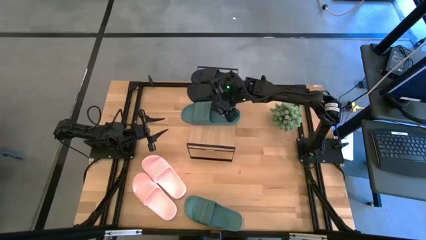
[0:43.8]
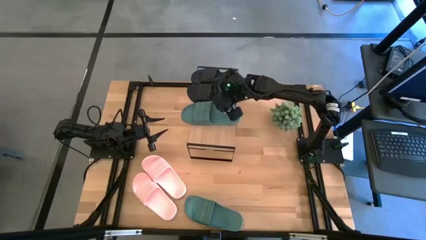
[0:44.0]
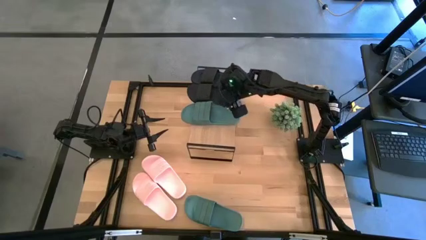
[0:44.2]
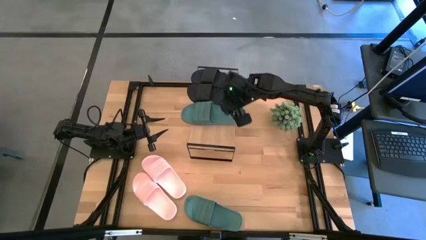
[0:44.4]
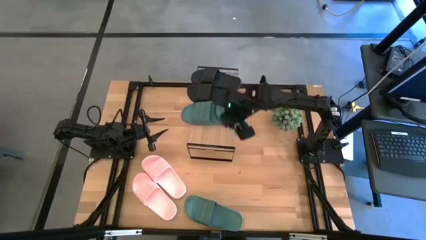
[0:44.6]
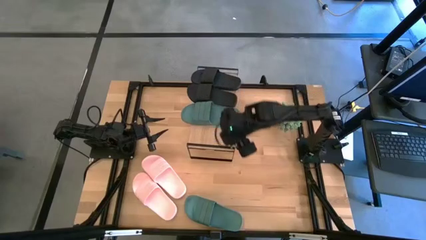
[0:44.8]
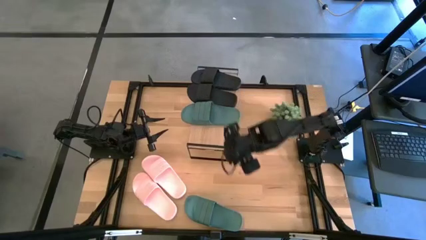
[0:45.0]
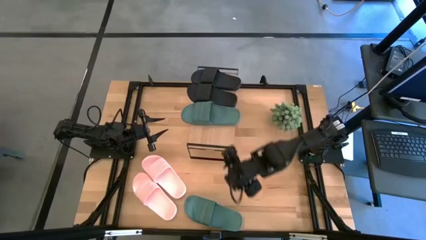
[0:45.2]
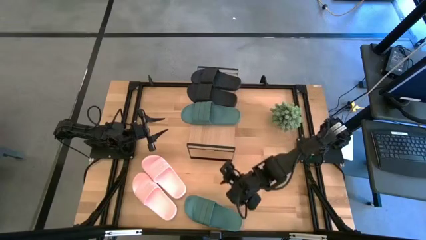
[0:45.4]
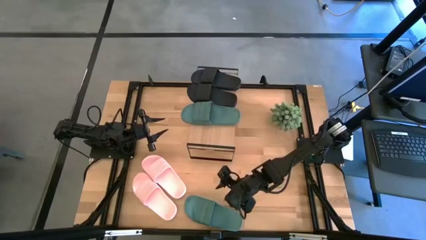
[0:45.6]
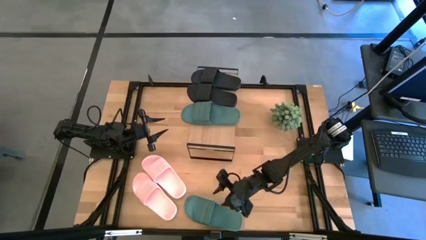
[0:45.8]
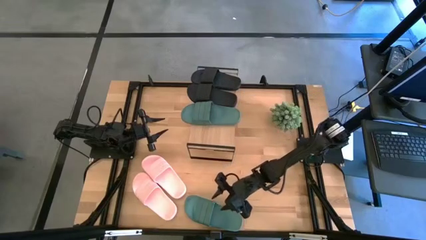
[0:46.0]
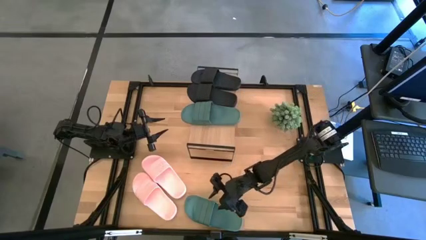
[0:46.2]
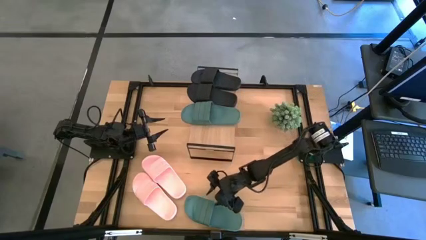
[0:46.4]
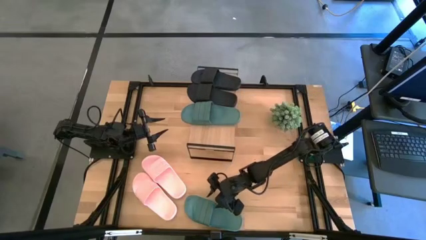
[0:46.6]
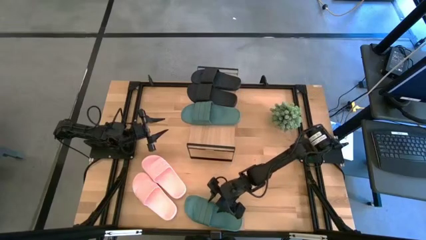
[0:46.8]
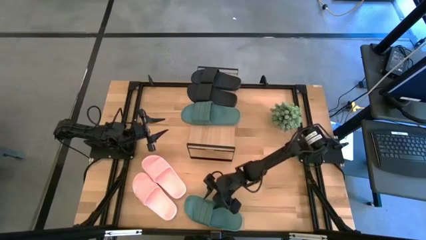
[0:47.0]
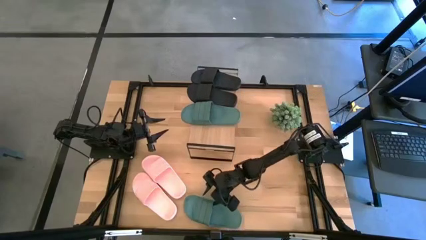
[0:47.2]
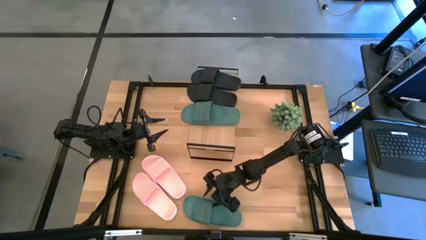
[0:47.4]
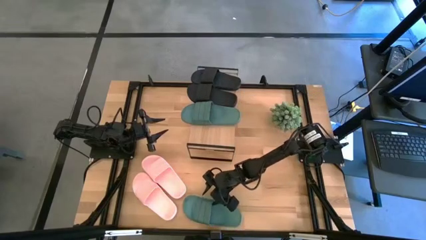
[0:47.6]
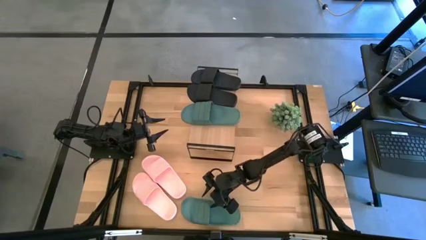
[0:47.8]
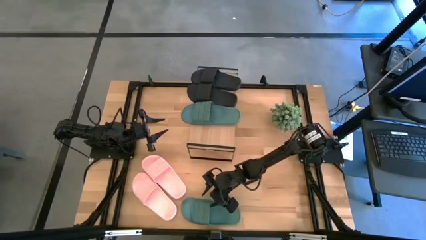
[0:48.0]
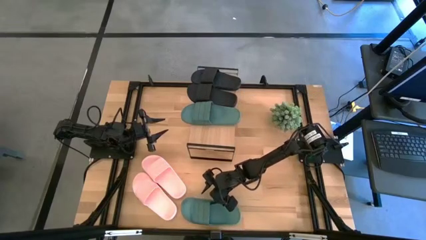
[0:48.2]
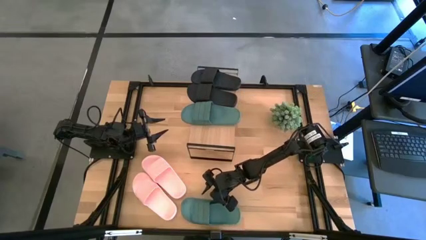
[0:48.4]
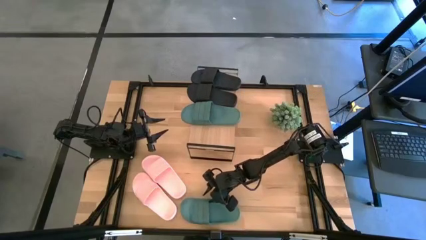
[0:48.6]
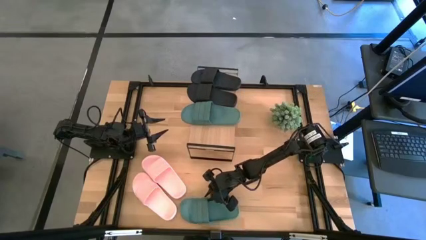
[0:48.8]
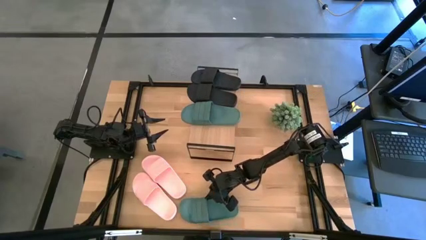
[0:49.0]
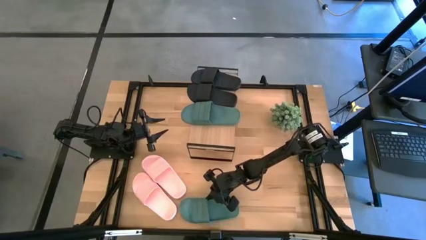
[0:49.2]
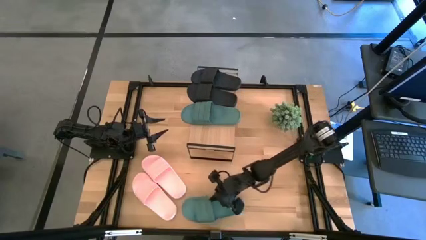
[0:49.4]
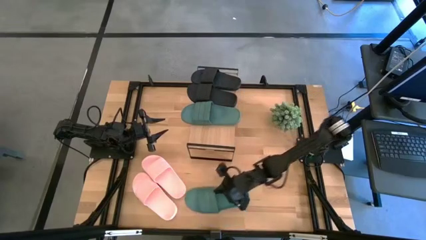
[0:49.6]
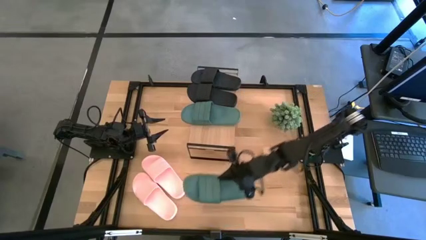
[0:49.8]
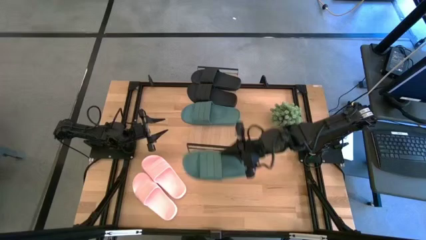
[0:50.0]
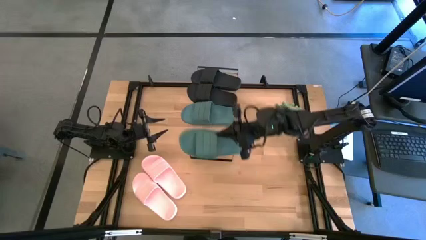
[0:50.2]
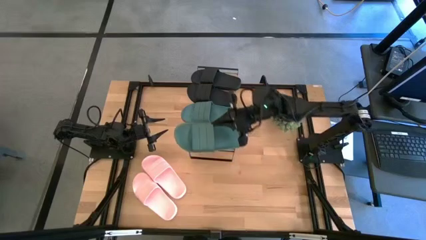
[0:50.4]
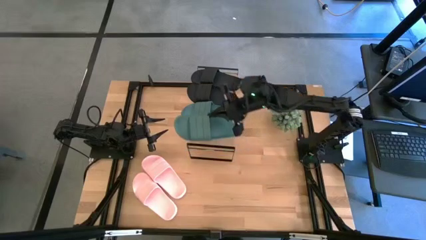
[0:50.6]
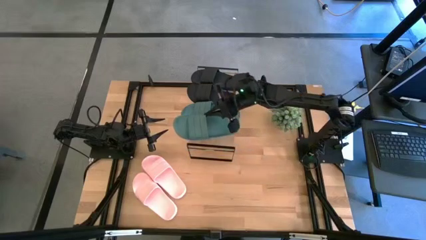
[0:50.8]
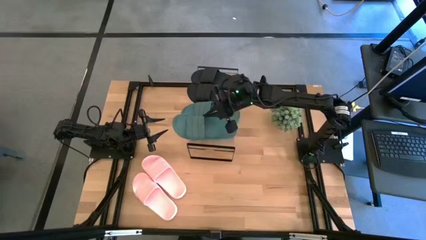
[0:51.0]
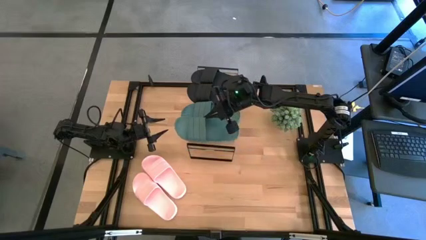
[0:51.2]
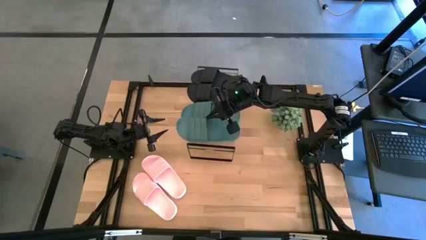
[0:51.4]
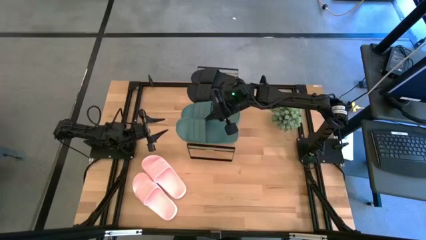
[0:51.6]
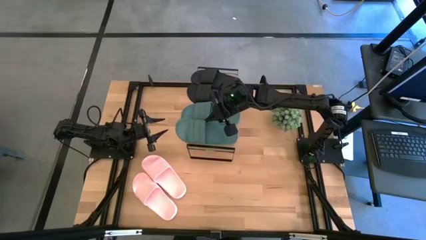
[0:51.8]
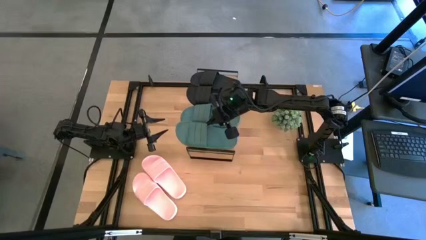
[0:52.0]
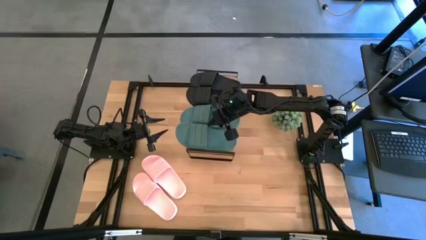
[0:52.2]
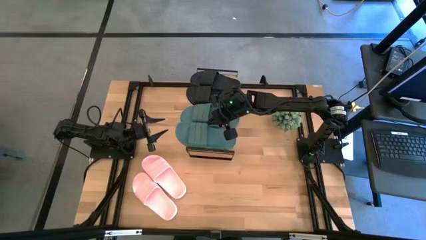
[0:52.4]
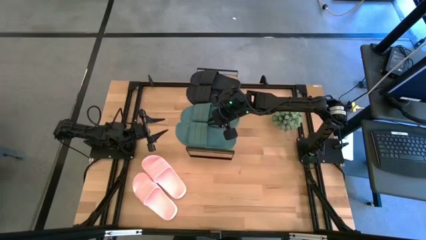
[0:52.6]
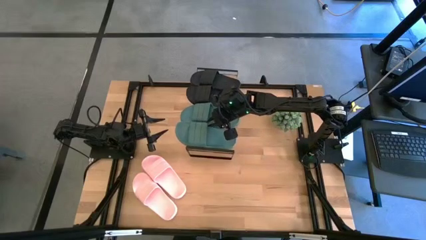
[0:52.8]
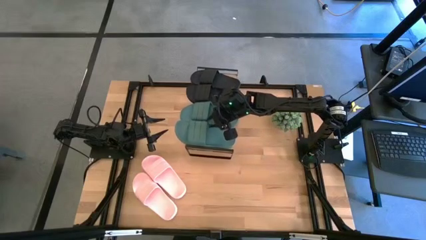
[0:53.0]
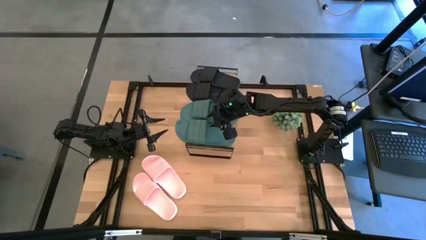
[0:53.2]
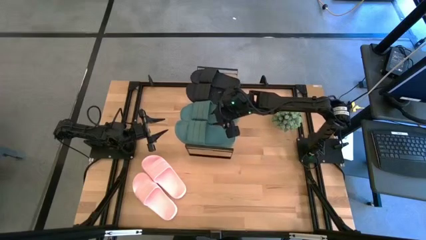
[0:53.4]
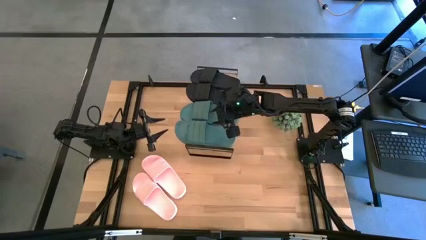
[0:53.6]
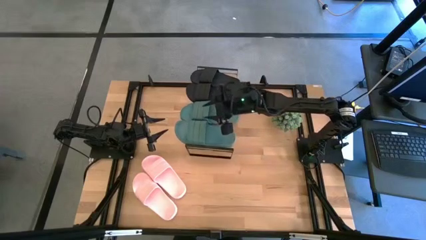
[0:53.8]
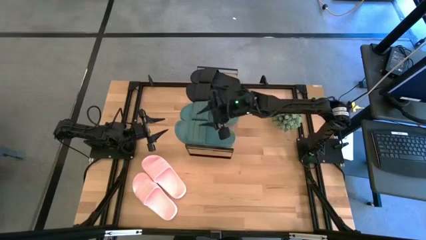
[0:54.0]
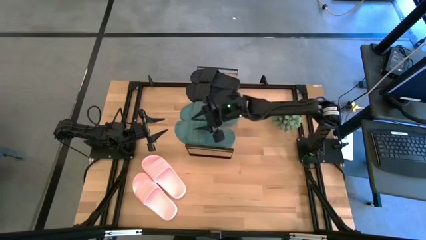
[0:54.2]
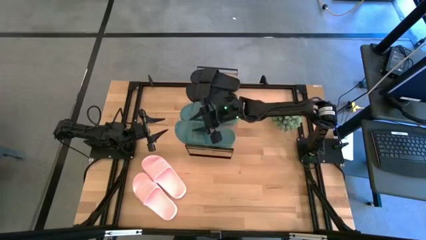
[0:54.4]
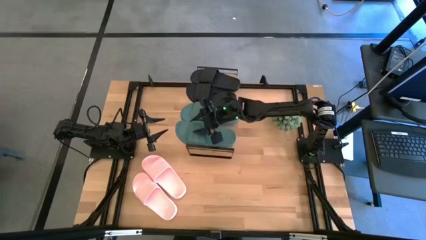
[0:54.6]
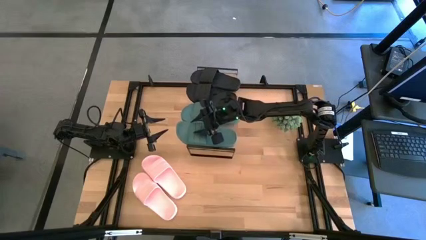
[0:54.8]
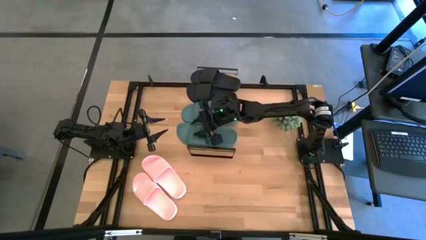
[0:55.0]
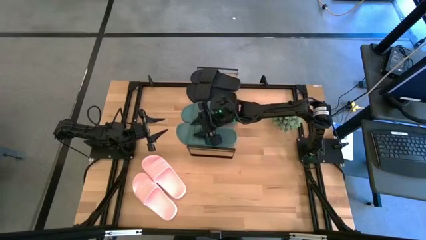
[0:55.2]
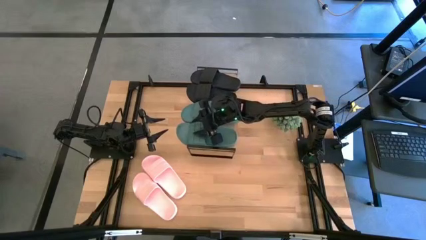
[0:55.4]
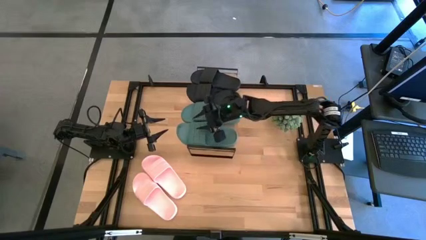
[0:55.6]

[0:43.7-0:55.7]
Task: Pick and place slides into the shelf
Put the blue slipper on the shelf

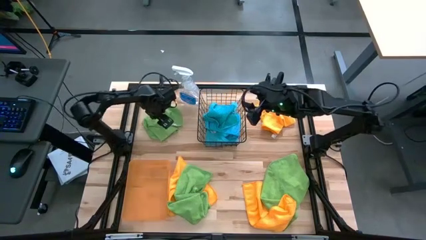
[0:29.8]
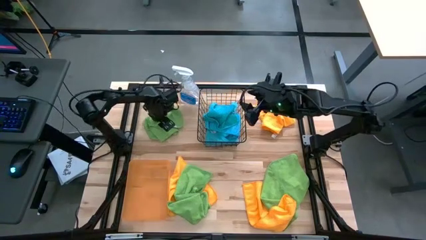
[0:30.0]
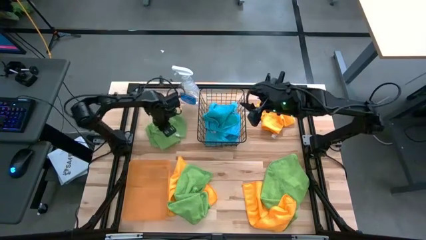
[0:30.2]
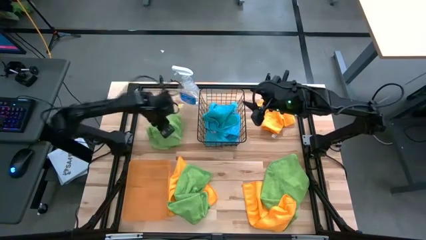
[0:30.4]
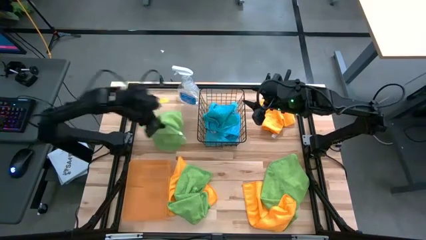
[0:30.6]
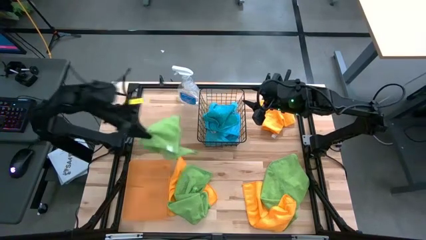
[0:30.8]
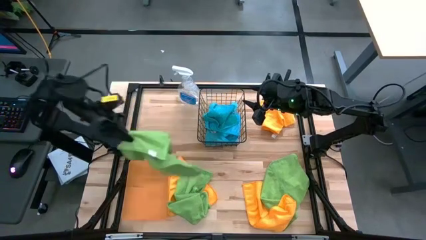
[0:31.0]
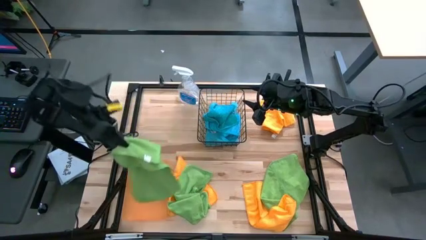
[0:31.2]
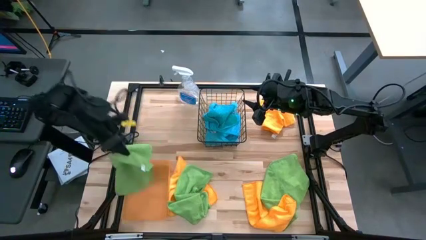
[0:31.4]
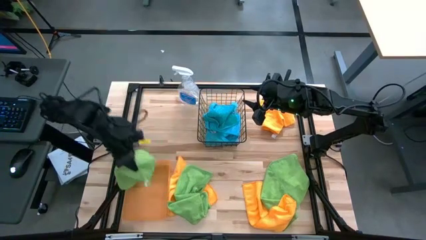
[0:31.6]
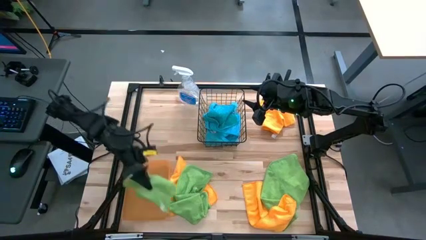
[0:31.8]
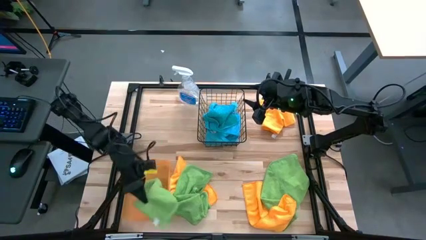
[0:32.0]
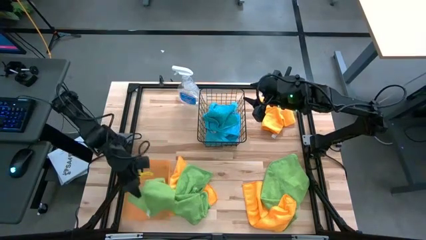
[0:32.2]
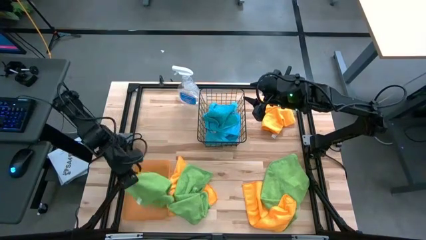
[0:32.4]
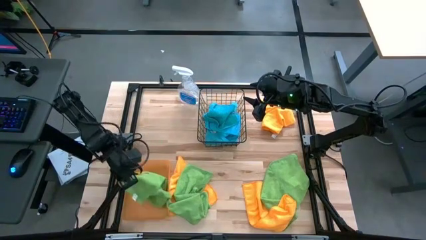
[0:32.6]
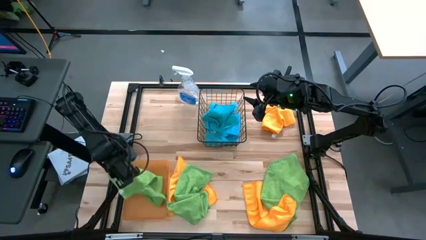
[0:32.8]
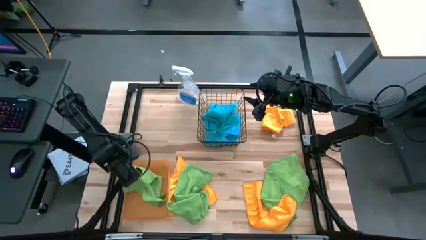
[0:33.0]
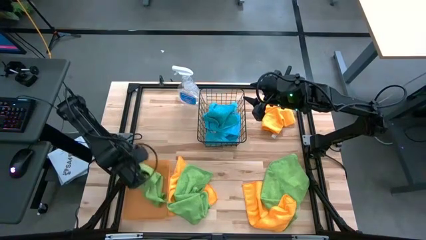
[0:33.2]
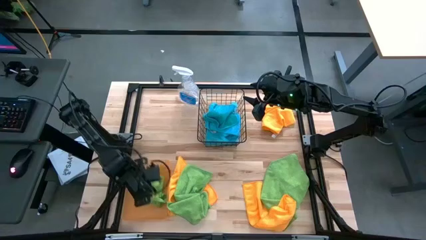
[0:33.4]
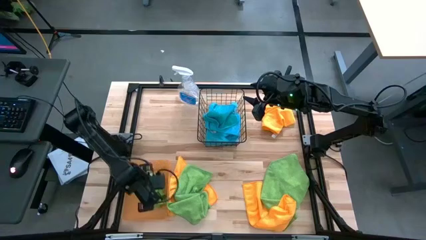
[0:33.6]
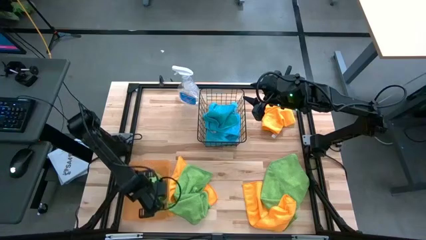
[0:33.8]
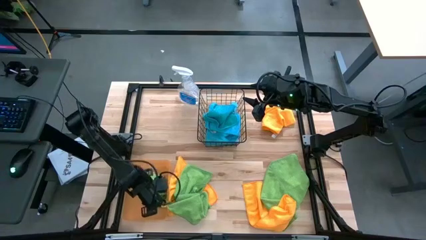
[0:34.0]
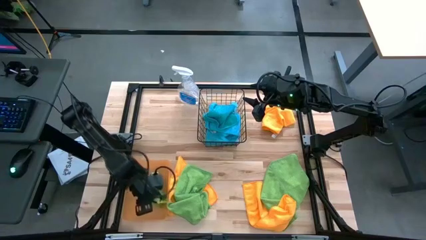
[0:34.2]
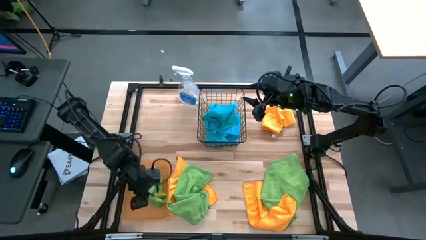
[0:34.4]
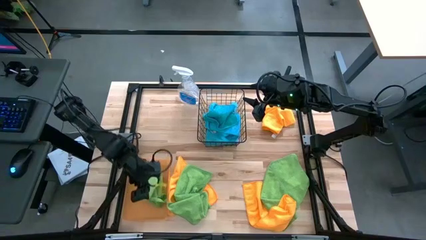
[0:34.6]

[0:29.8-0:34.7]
Task: Sort microfiber towel by color & place in baskets
Put the top left green towel into the orange bin
